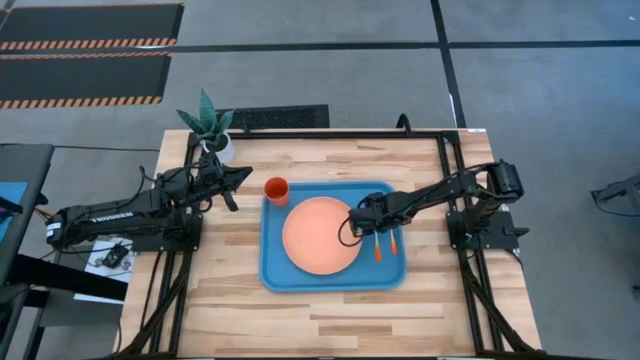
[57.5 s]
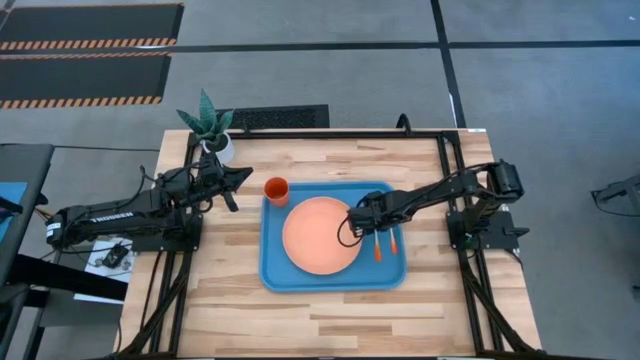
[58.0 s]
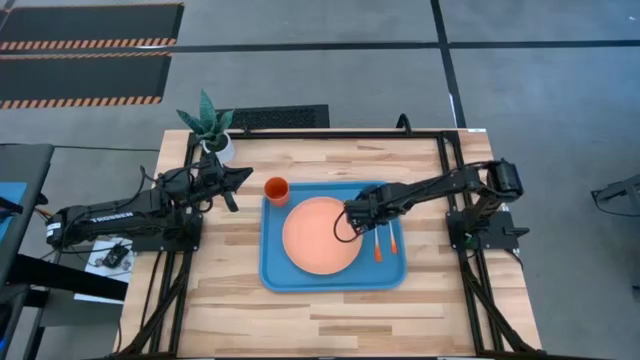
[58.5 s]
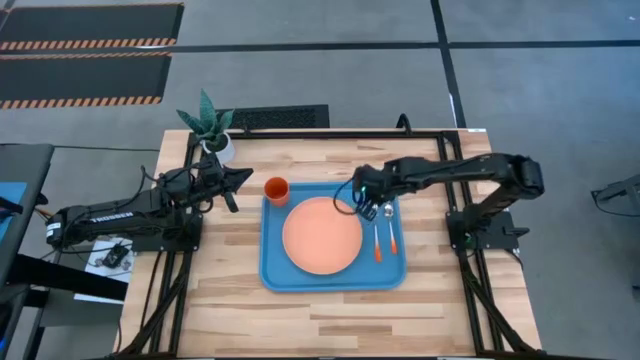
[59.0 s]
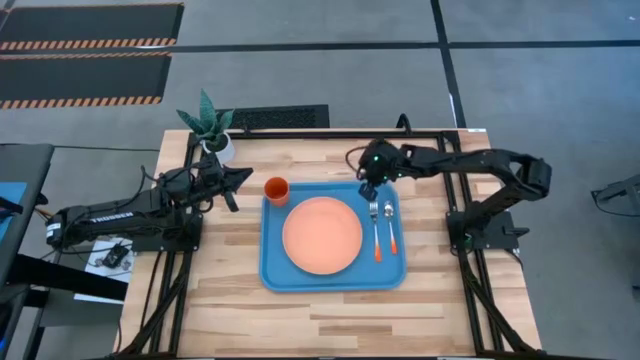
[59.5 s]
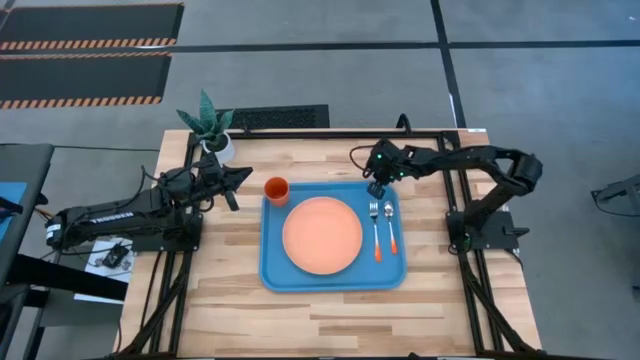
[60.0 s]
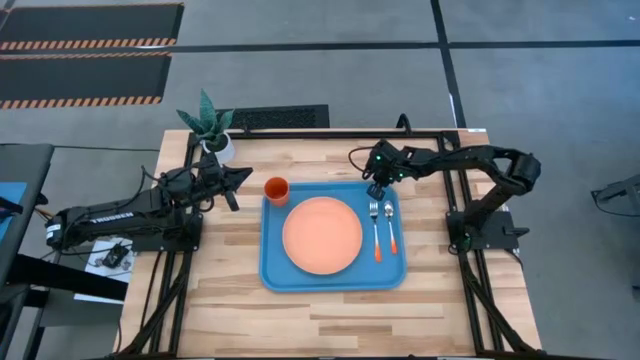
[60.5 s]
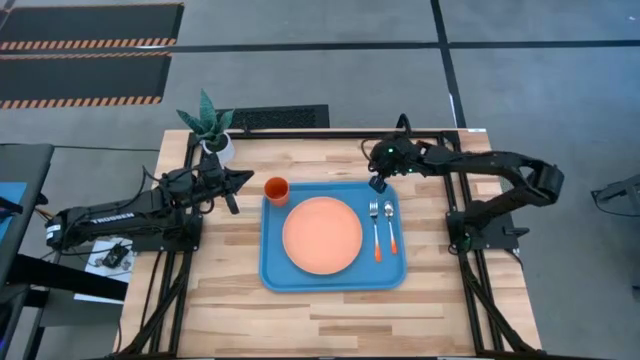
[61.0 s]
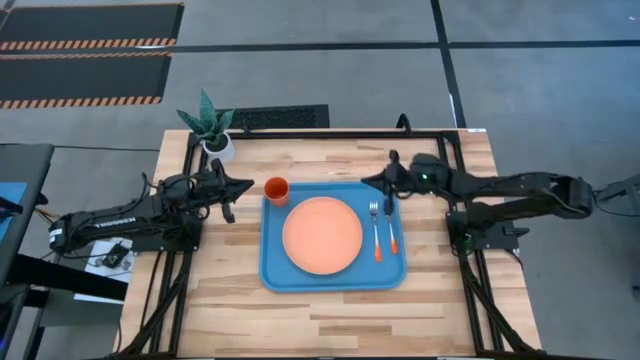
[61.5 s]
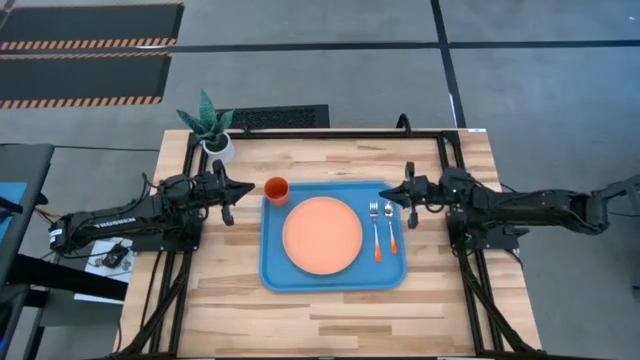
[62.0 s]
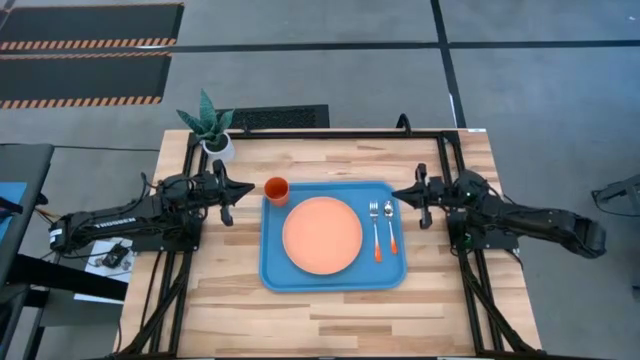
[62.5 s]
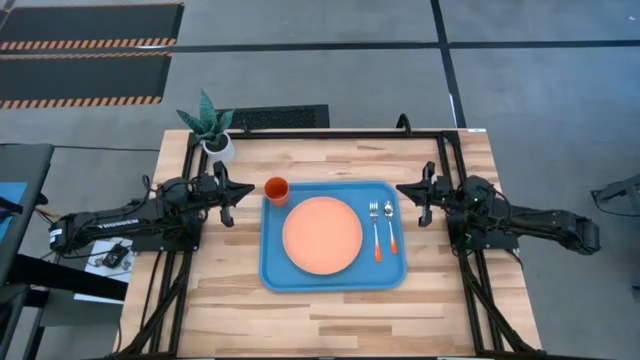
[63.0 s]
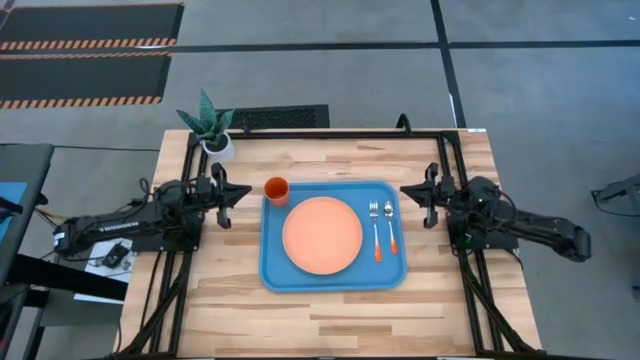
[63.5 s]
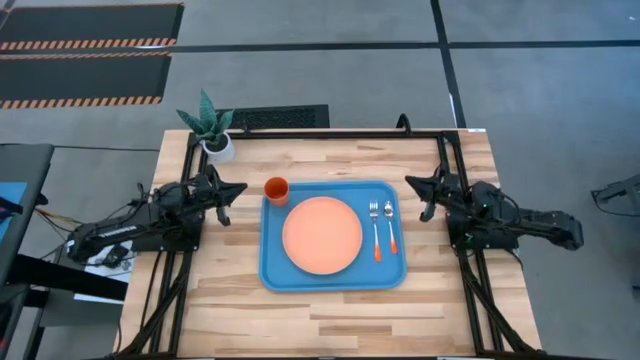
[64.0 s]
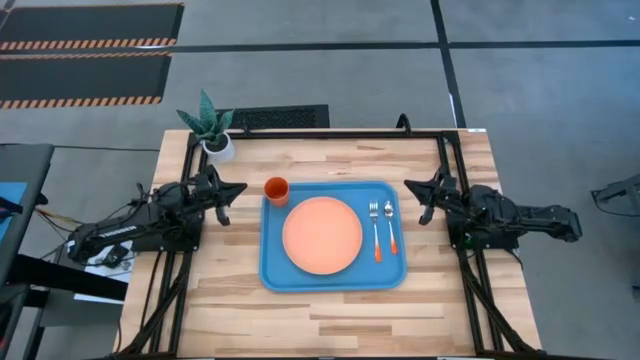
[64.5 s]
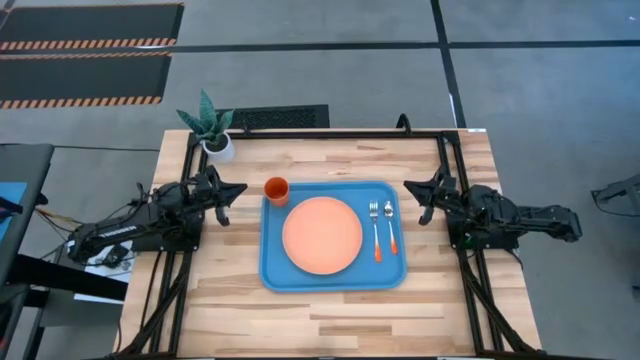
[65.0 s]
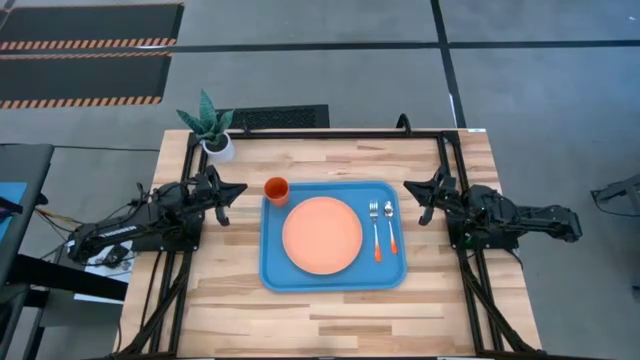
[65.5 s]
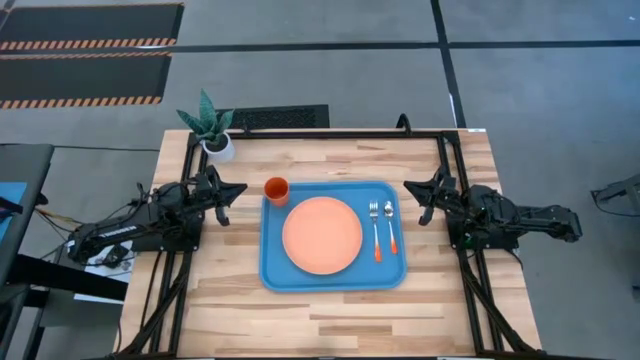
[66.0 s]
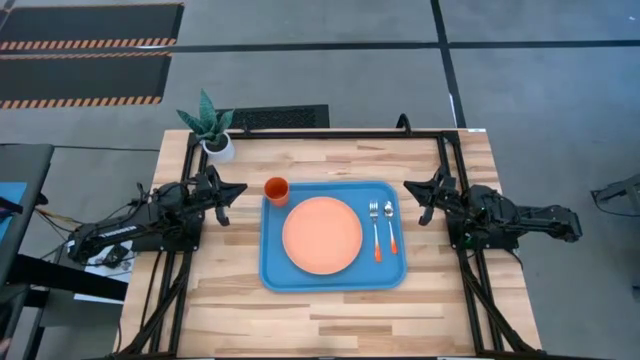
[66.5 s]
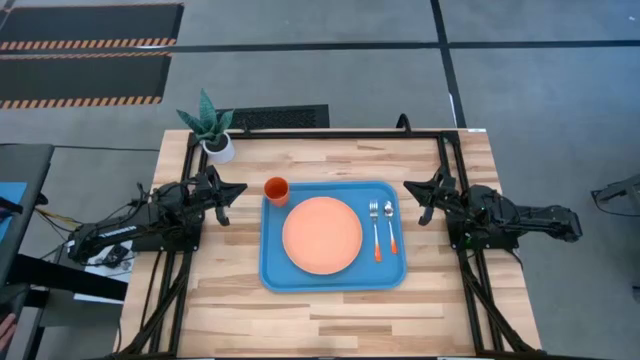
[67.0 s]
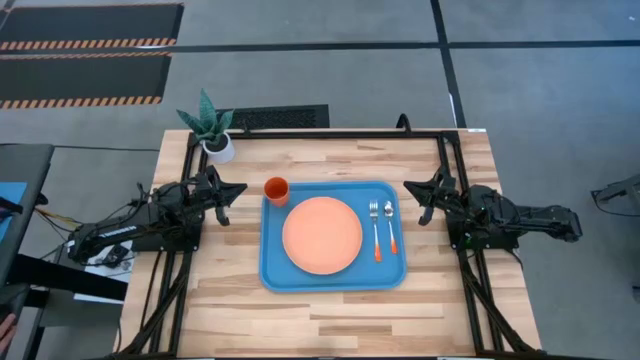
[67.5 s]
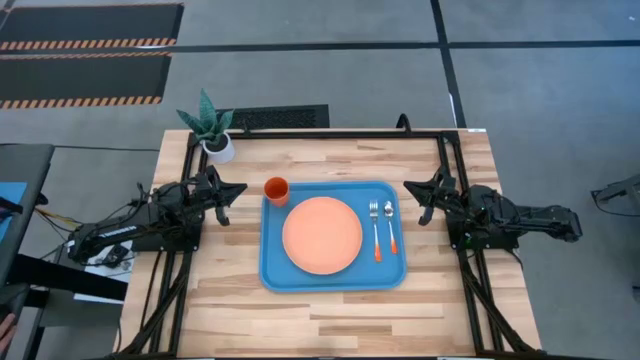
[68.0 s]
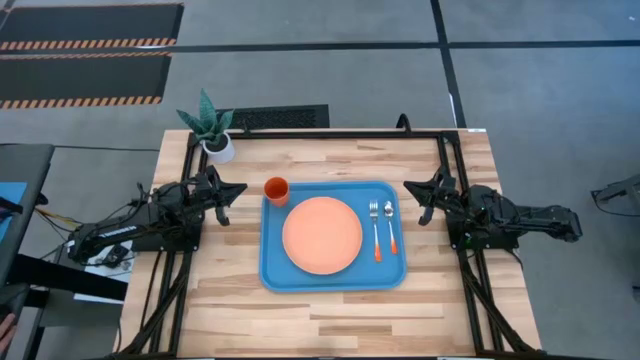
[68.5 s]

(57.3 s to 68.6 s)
Task: Pick and place plate/cup/fork/spoon on tray
Return to Home Position

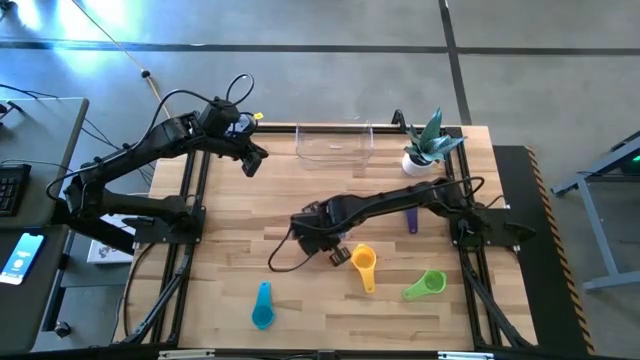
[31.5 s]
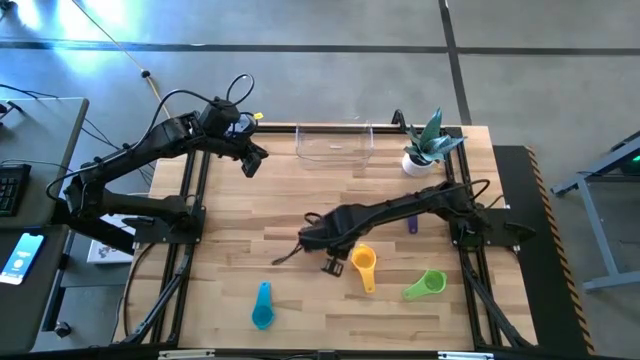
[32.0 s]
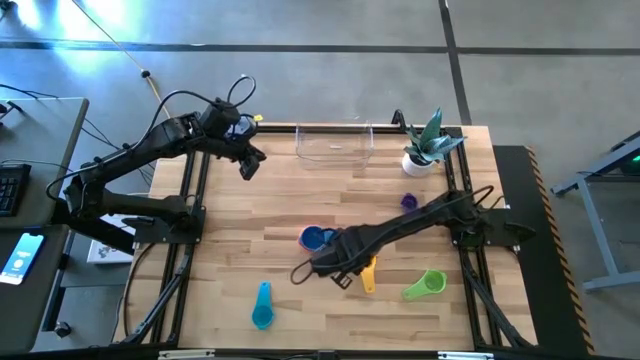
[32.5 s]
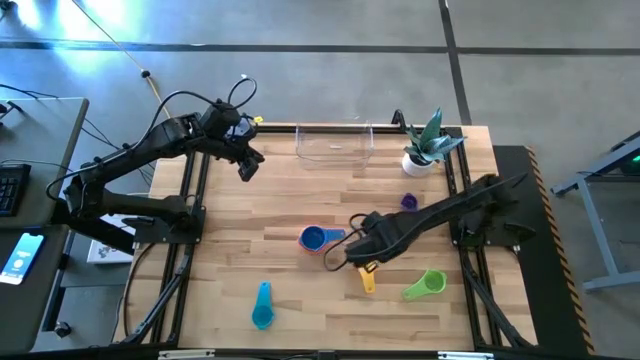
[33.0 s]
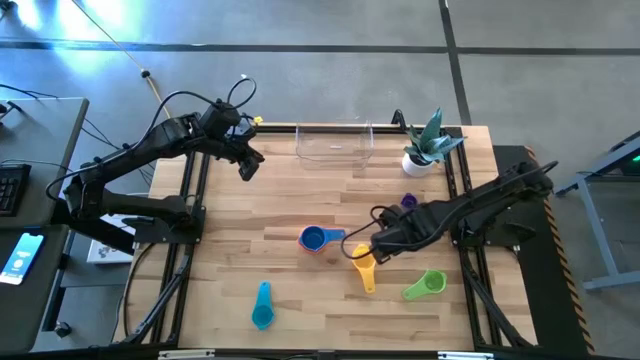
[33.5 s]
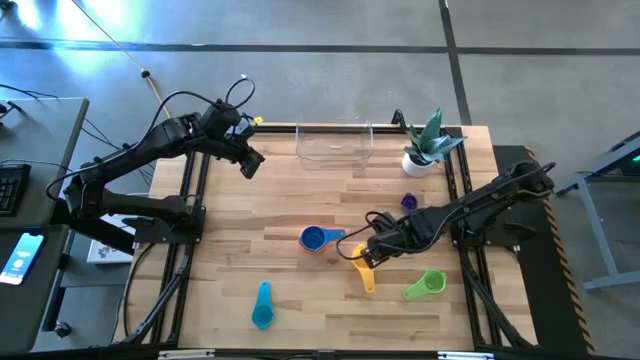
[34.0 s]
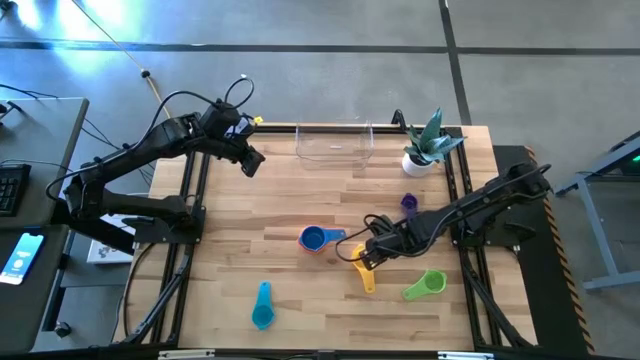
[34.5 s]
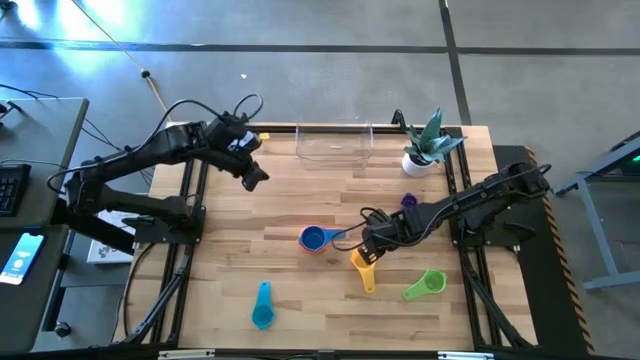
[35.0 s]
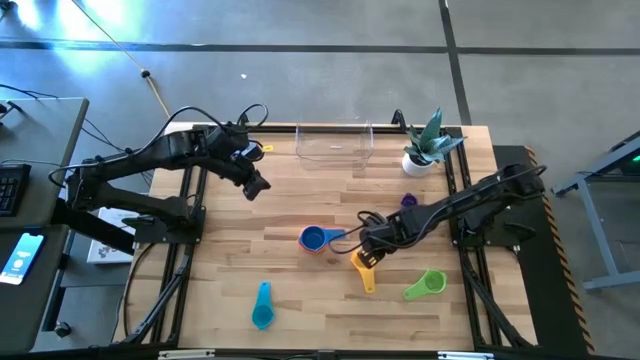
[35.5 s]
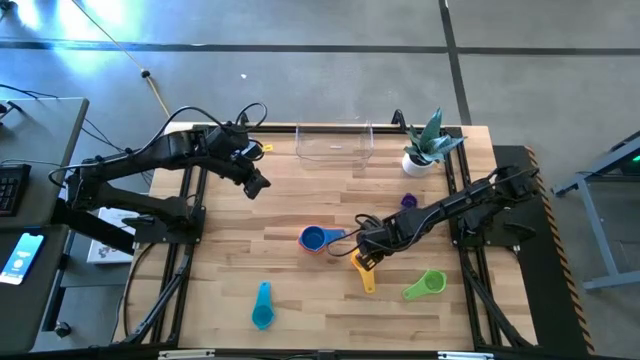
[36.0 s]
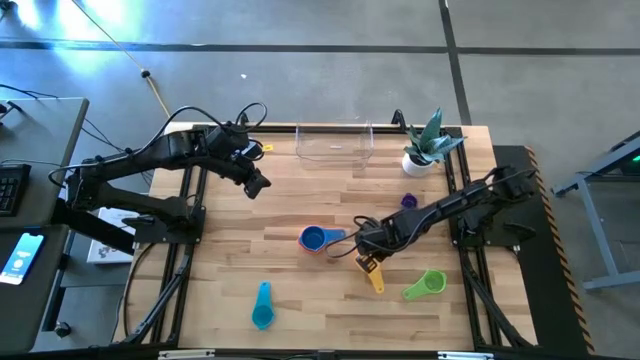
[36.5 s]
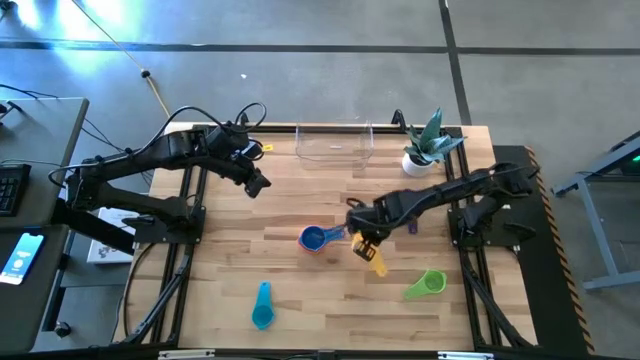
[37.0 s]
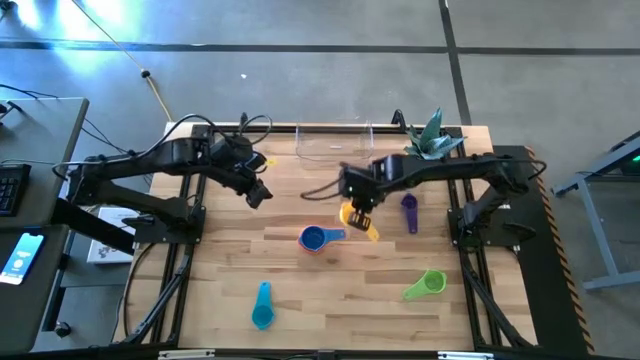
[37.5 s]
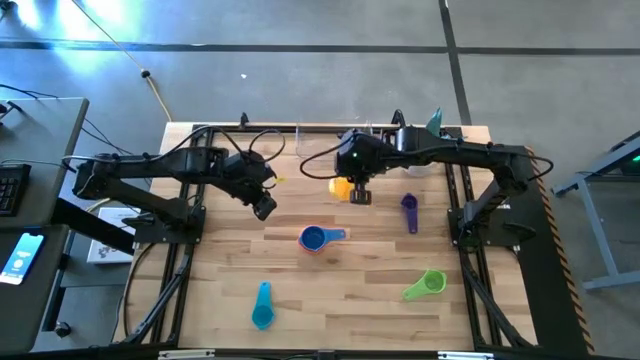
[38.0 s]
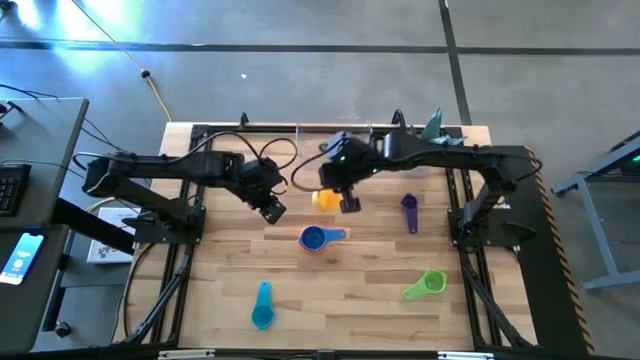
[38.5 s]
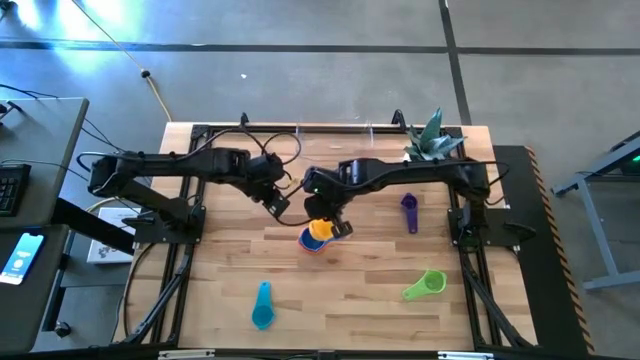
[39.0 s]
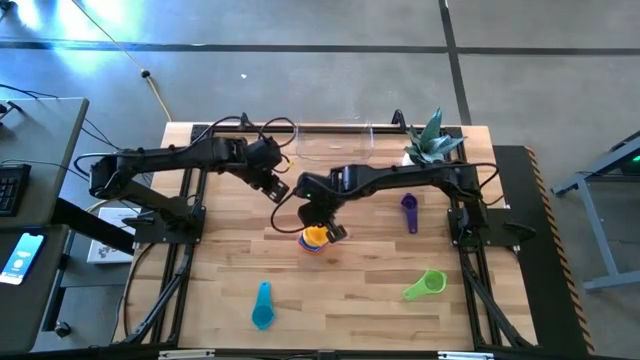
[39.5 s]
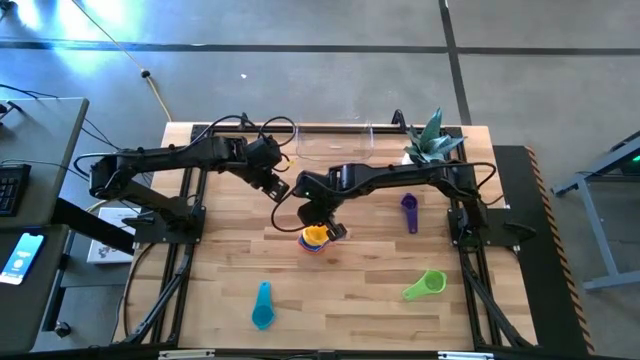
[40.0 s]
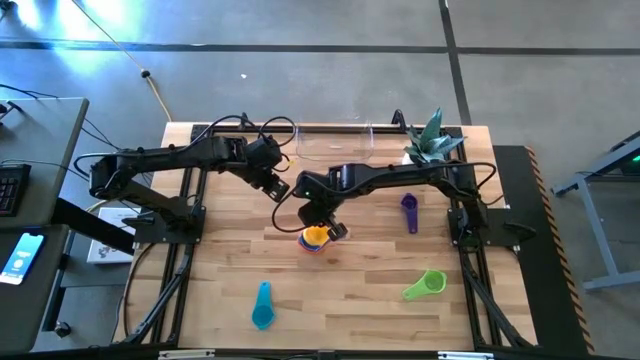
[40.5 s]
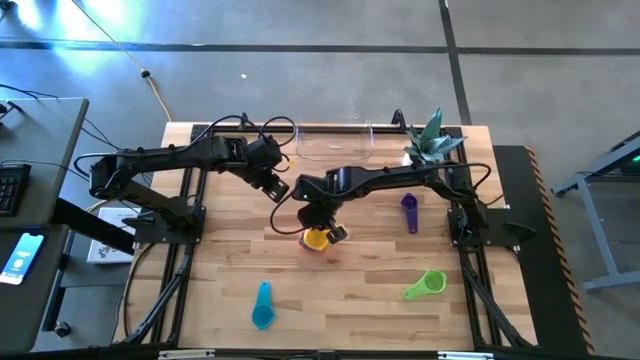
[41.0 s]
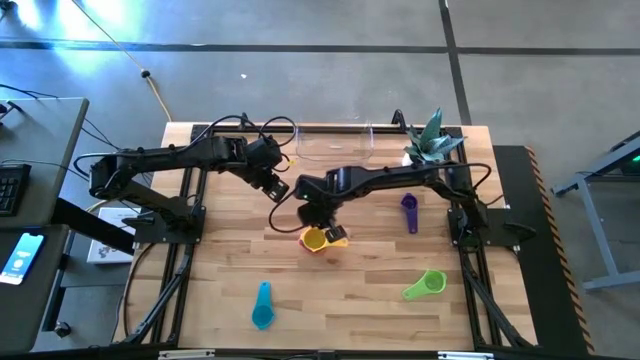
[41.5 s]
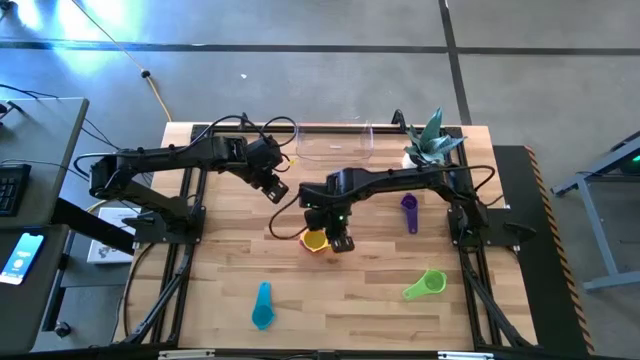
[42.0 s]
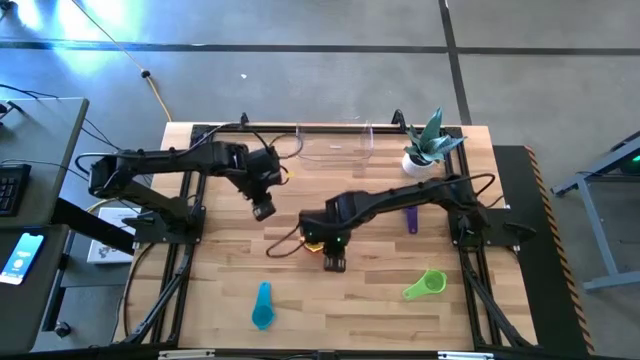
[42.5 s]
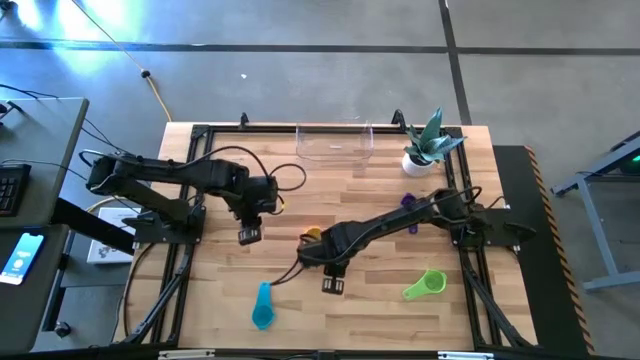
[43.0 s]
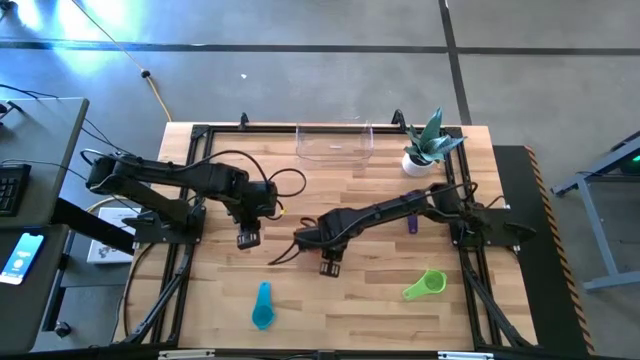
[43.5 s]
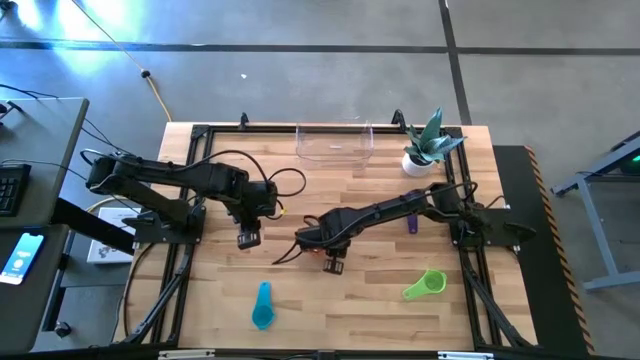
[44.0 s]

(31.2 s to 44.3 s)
Task: Nest measuring cups in basket
Stack the yellow measuring cup on top of the blue measuring cup
